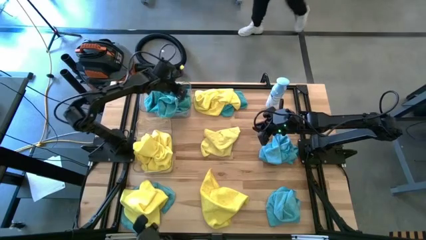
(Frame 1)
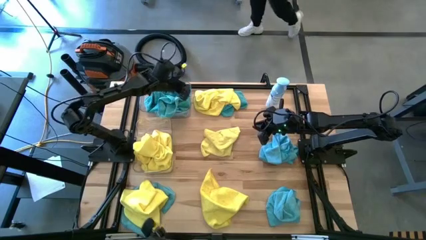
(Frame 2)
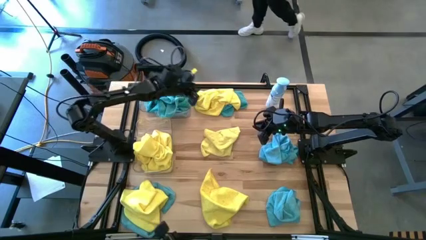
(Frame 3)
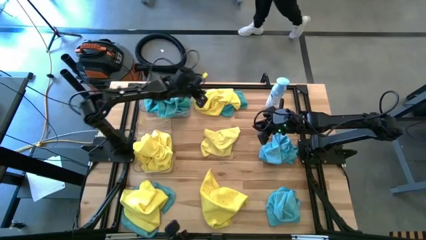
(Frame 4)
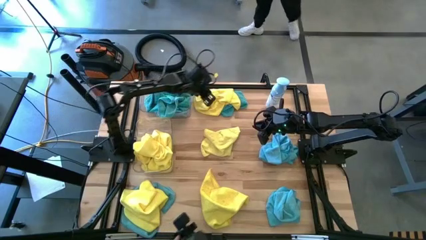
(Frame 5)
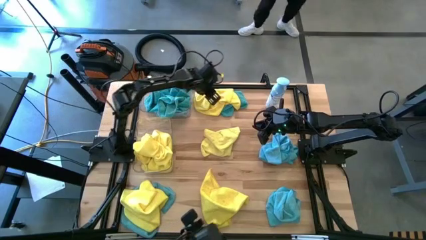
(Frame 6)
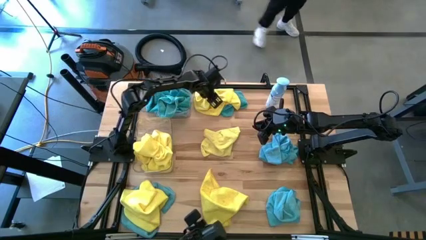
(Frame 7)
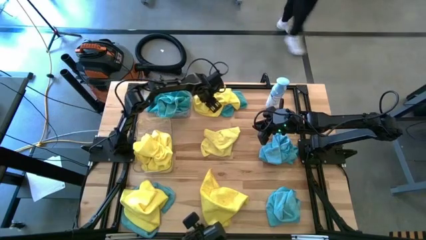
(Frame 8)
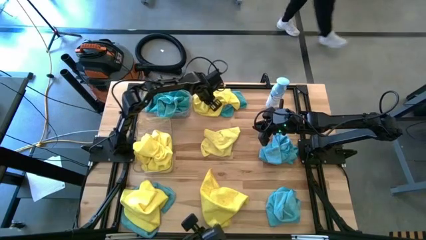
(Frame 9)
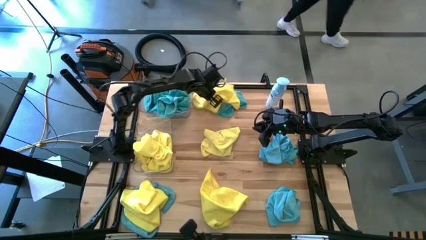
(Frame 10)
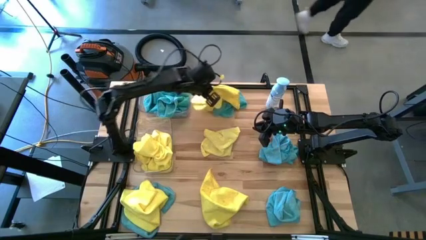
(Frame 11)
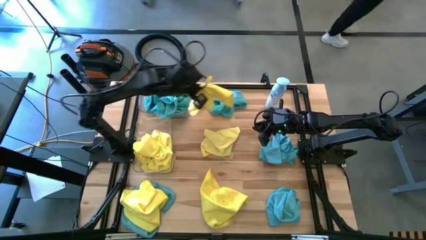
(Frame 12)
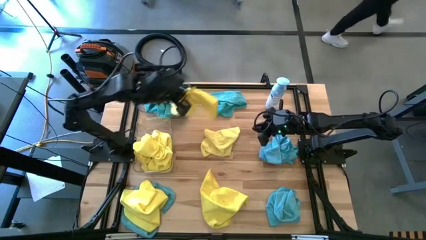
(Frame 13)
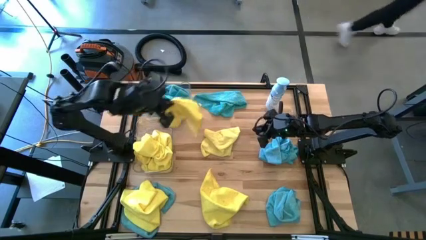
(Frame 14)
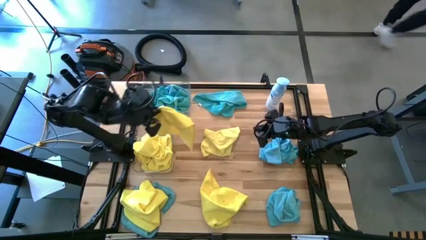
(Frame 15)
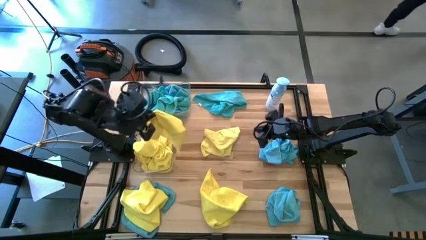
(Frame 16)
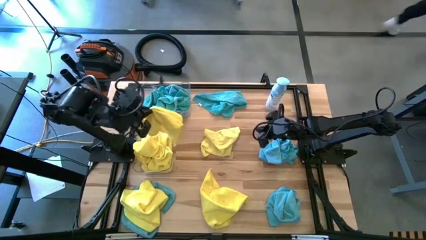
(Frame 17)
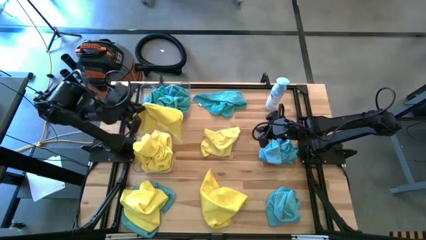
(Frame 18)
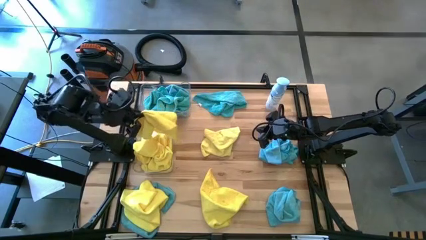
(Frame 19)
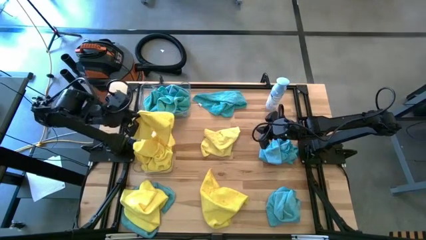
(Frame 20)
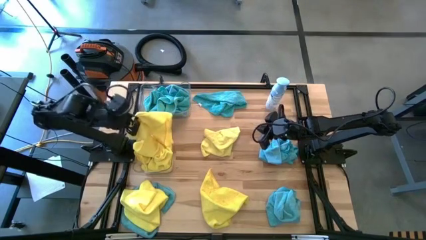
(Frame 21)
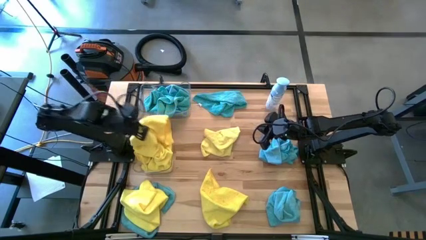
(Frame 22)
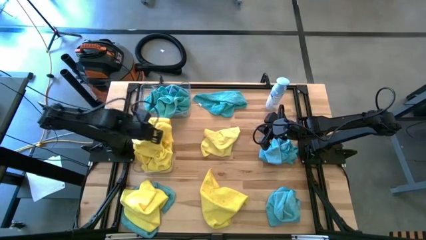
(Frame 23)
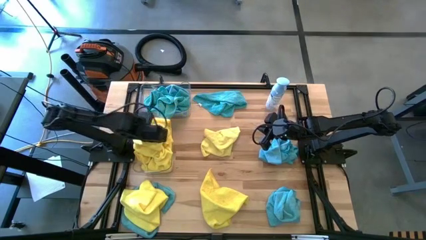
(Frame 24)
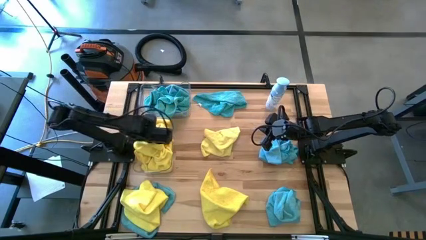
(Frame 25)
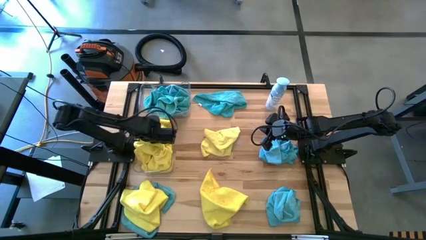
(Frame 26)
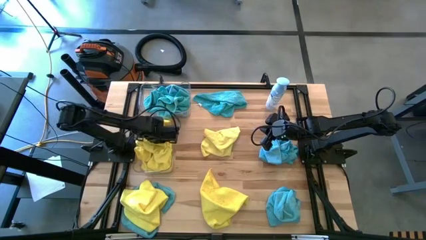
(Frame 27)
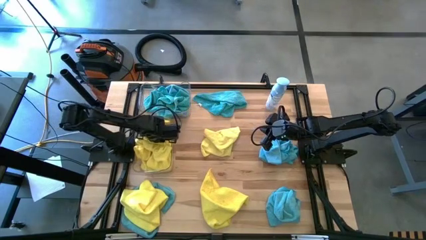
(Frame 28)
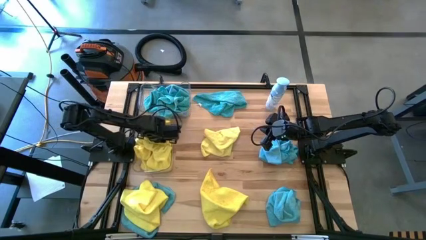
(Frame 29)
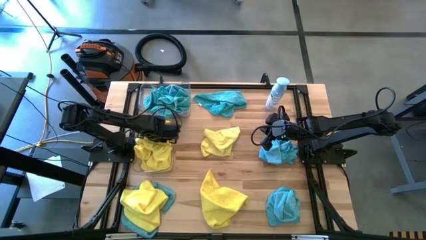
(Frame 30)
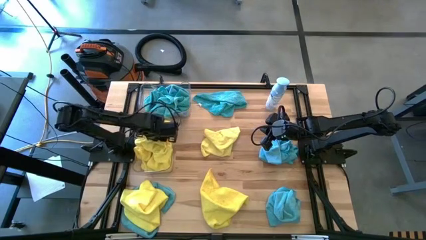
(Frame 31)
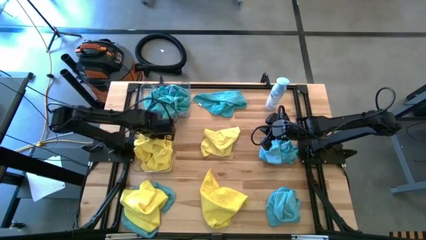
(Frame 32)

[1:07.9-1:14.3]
Task: Sort microfiber towel by color & place in baskets
Put the yellow towel into the bottom transparent bin

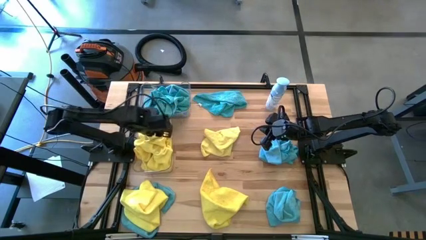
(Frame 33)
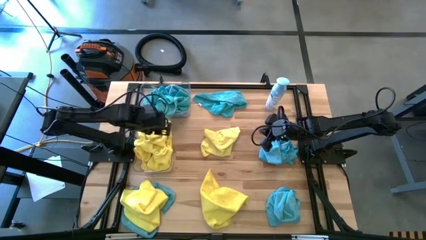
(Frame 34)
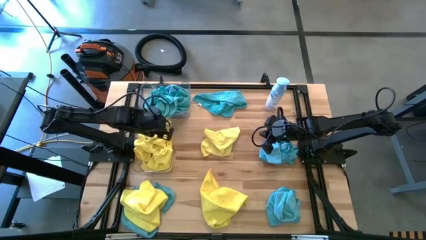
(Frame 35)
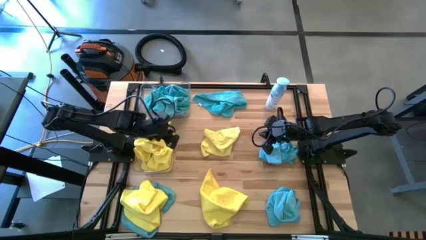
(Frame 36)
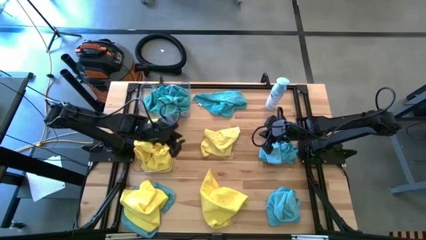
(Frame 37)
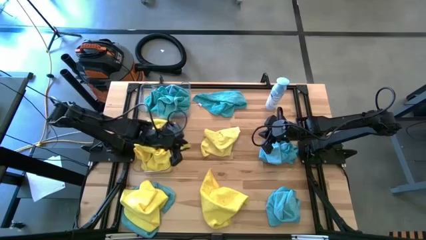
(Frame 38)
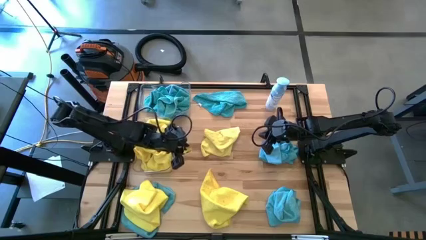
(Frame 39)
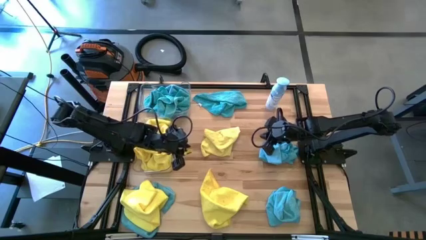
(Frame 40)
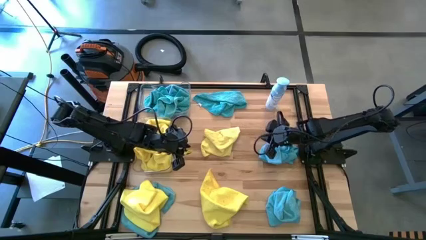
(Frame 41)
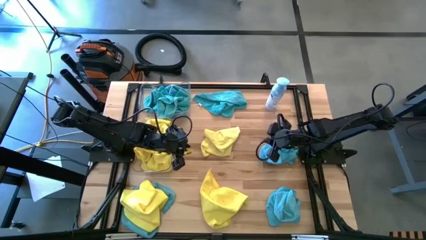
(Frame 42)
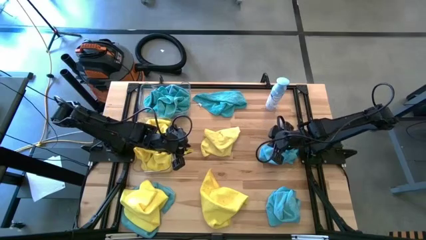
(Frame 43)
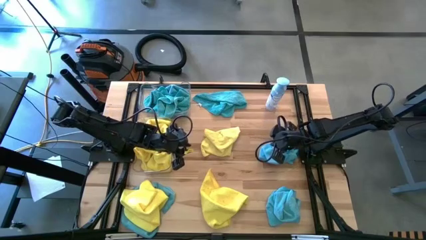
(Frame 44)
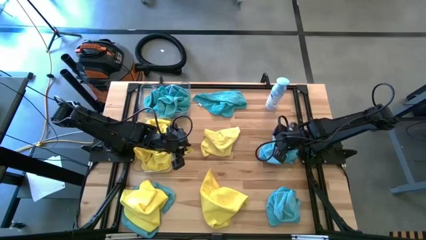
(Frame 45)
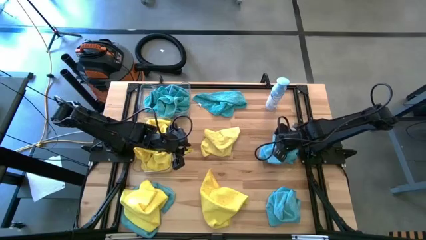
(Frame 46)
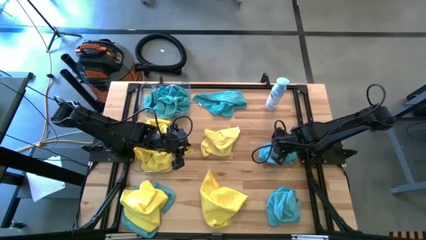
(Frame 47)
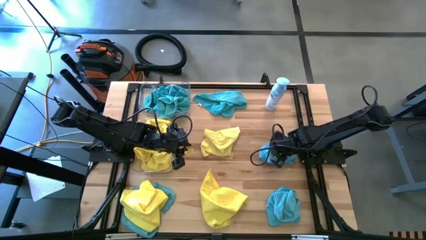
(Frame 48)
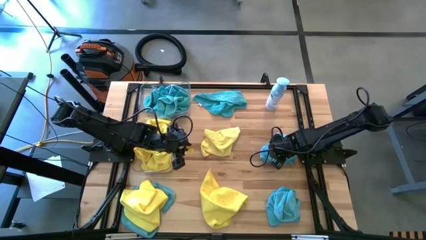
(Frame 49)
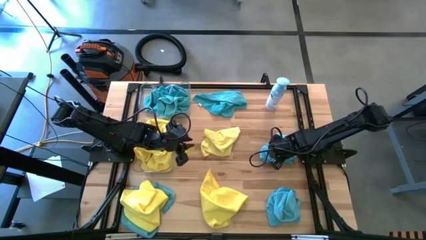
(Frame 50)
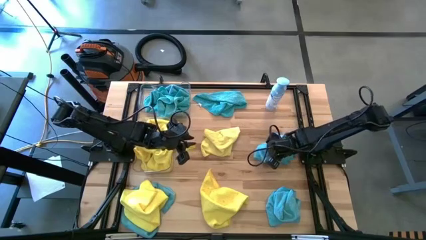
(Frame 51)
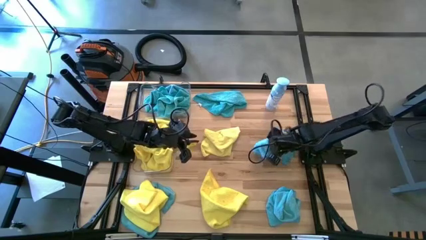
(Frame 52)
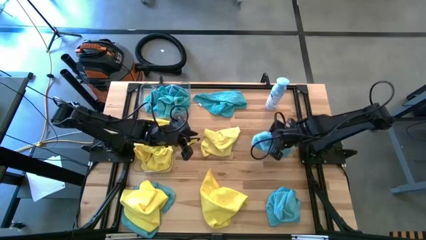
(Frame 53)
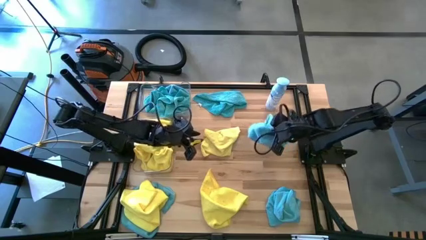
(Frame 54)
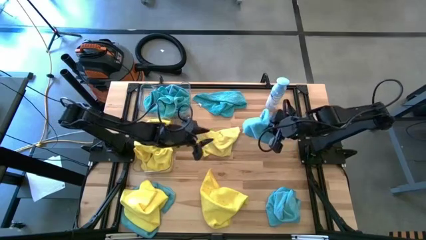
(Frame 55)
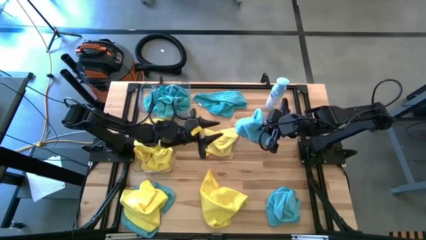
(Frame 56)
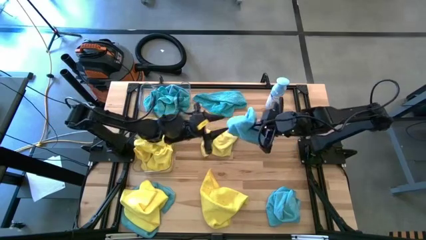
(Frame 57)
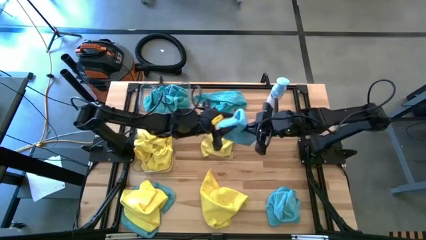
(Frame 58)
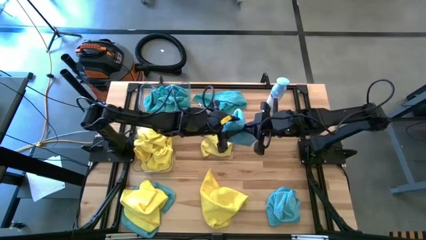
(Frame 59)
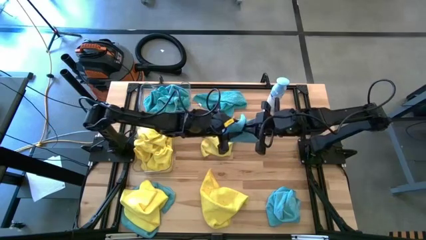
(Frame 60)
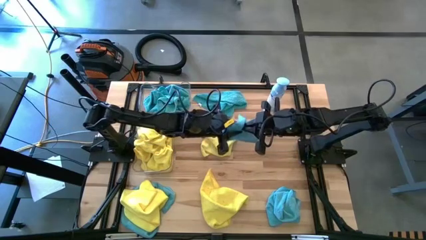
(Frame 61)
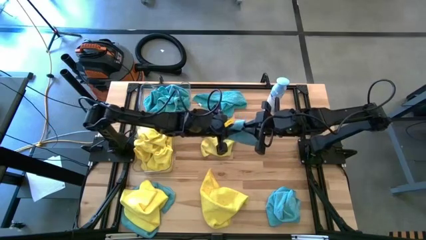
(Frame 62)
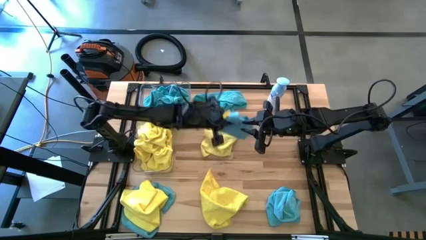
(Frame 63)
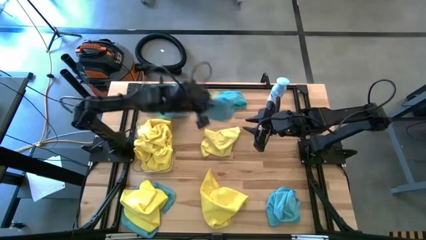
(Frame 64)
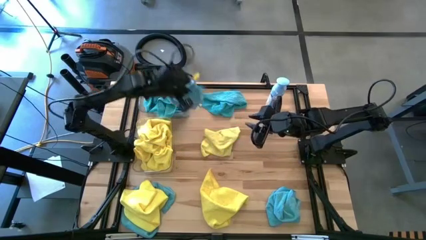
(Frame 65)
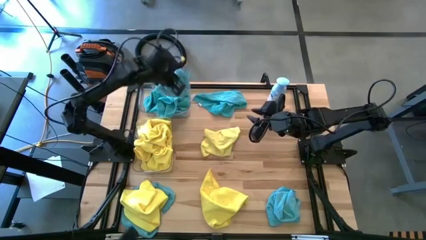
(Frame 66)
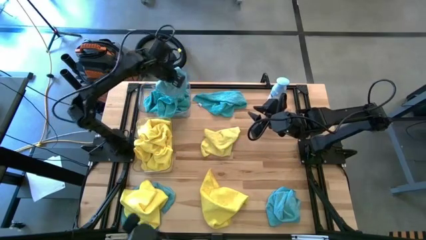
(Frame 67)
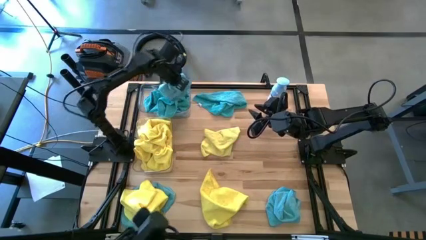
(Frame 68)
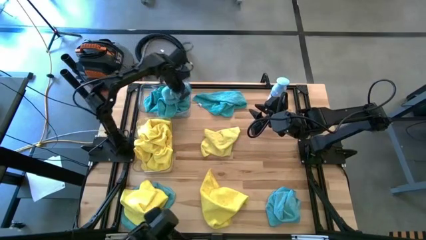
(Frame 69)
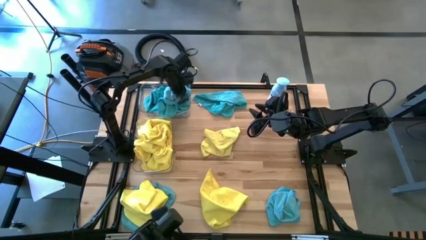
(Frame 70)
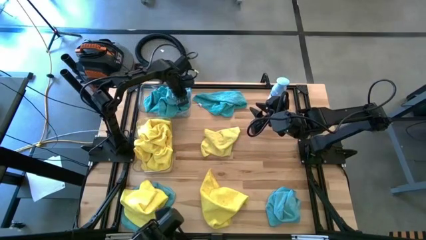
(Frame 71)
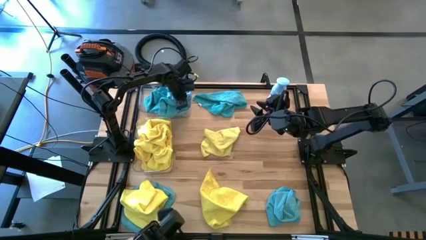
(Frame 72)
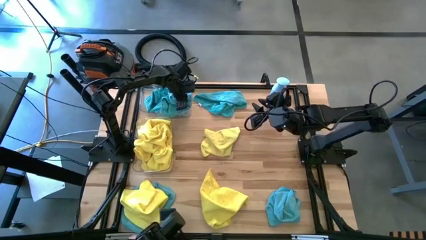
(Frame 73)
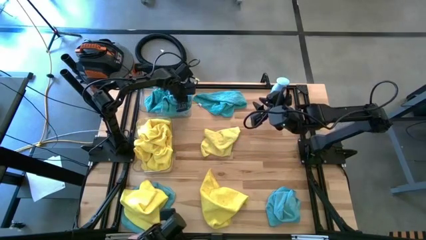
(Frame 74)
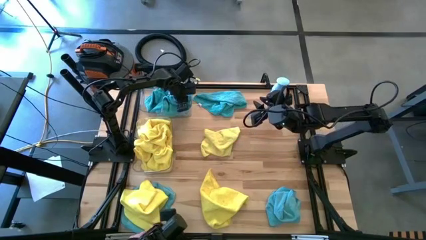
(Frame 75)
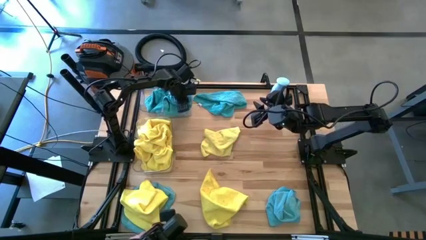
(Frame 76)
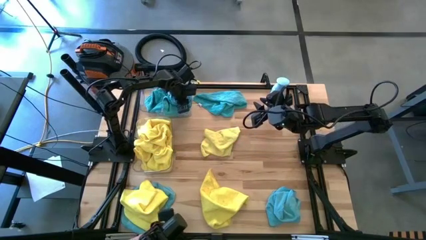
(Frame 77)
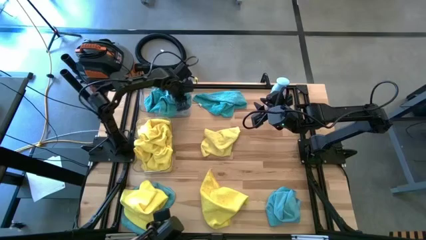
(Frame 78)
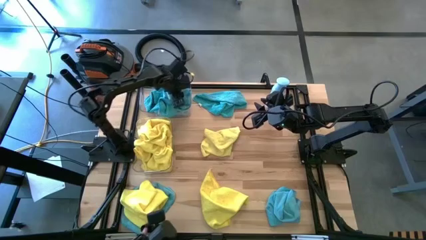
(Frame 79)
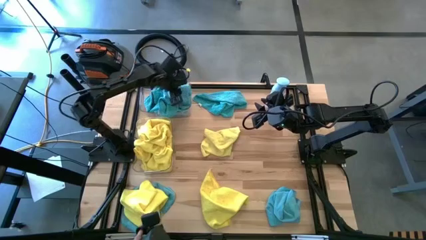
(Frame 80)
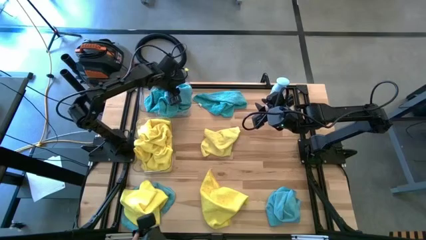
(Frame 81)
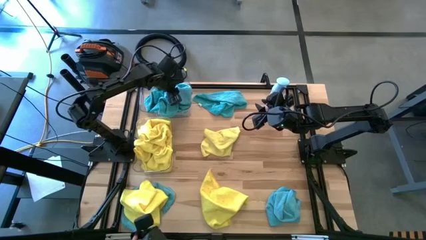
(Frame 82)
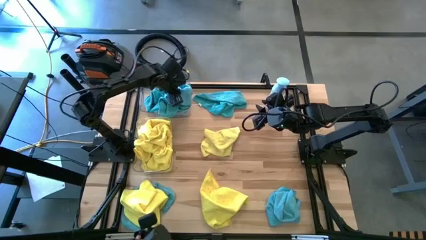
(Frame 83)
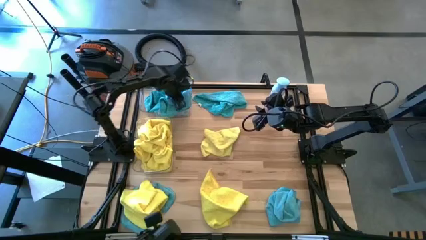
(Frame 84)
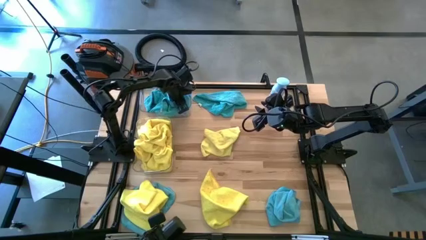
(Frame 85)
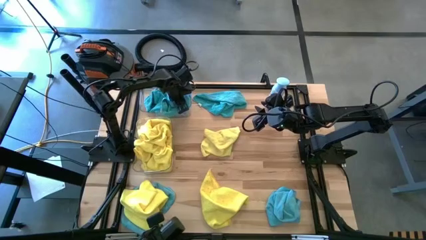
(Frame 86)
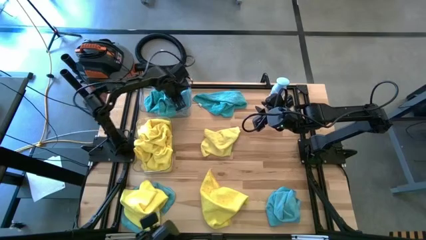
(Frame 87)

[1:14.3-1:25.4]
Put the blue towel into the top transparent bin
